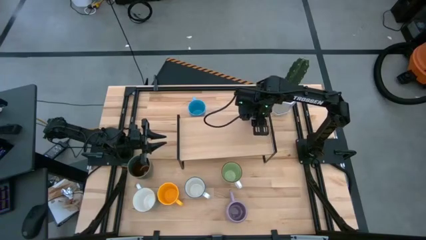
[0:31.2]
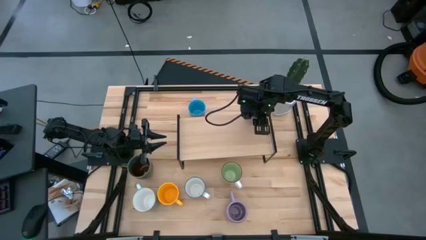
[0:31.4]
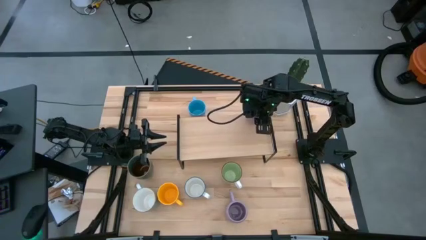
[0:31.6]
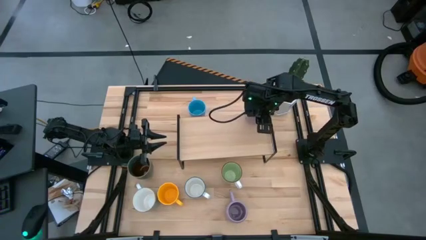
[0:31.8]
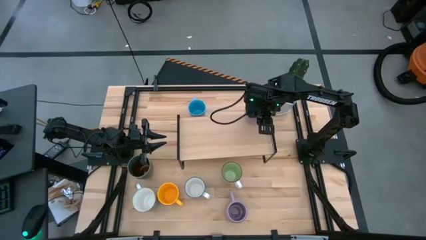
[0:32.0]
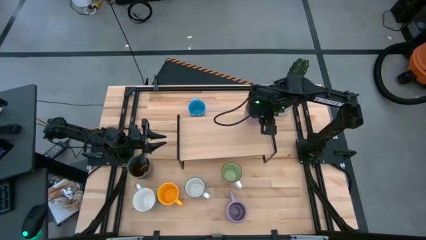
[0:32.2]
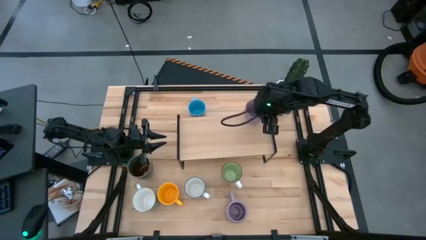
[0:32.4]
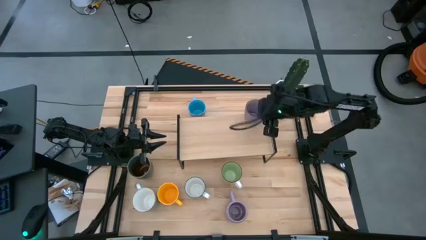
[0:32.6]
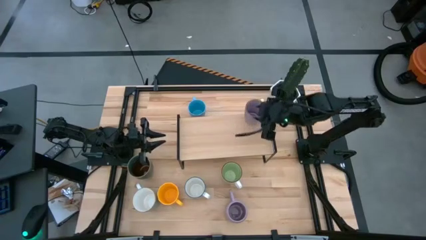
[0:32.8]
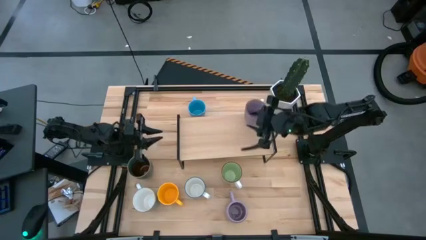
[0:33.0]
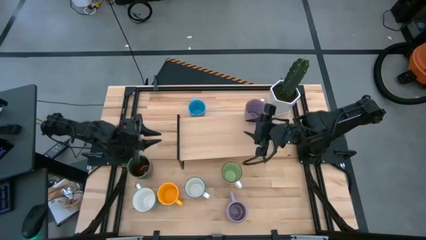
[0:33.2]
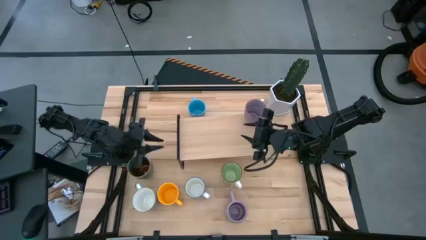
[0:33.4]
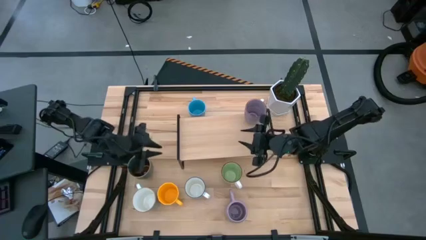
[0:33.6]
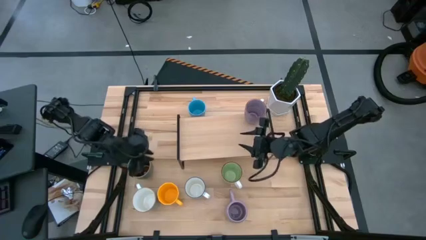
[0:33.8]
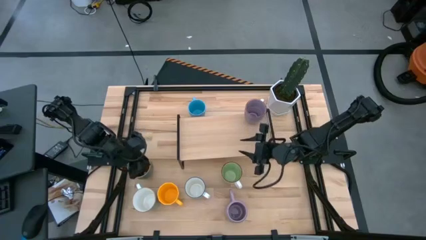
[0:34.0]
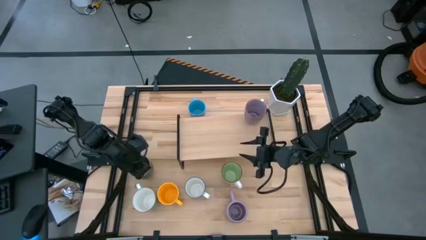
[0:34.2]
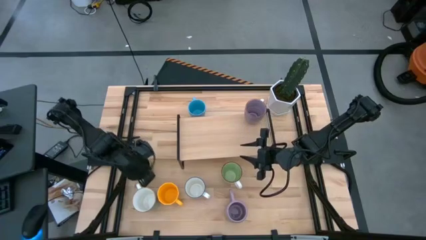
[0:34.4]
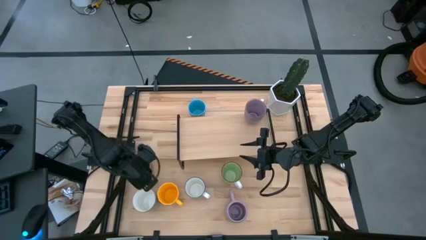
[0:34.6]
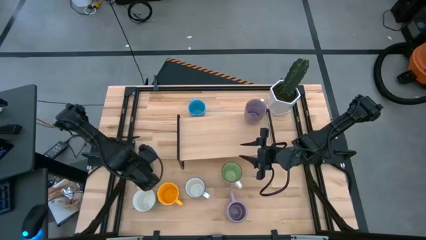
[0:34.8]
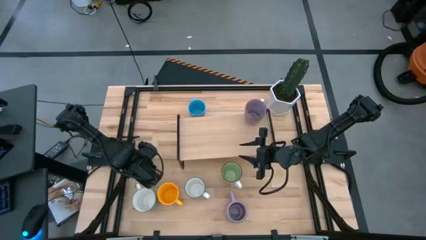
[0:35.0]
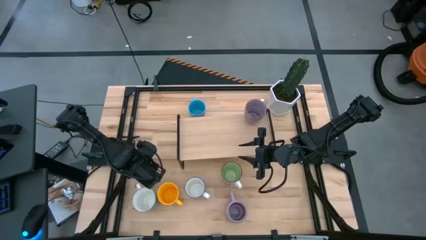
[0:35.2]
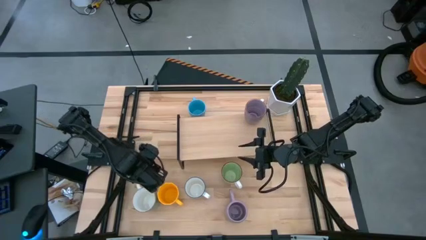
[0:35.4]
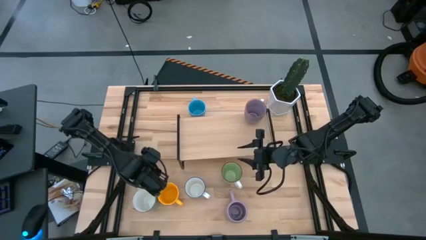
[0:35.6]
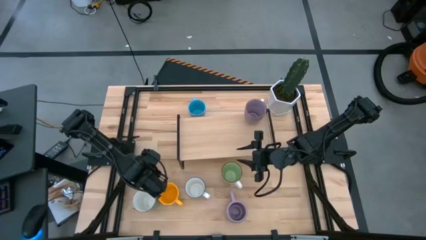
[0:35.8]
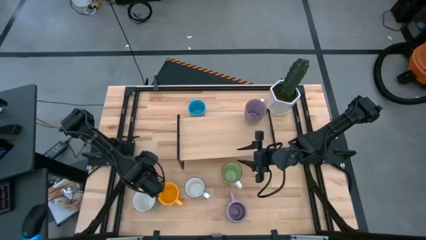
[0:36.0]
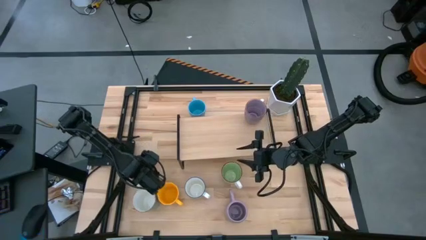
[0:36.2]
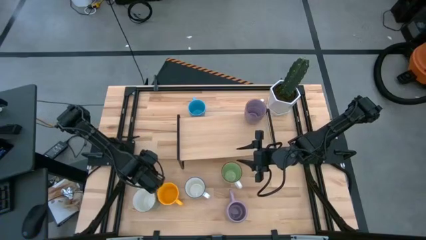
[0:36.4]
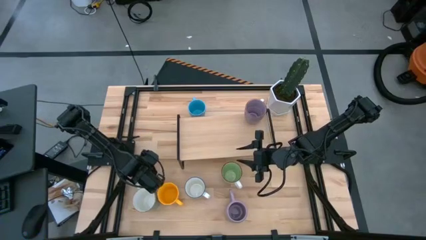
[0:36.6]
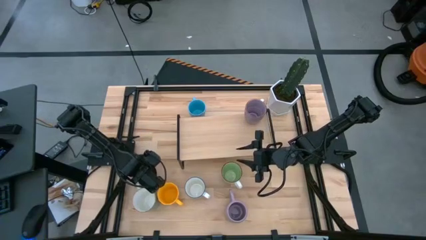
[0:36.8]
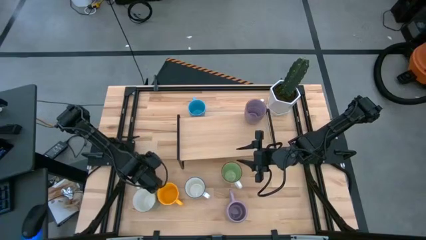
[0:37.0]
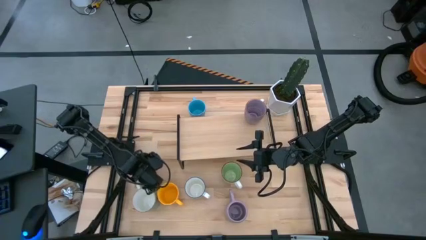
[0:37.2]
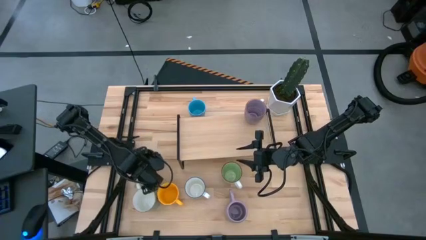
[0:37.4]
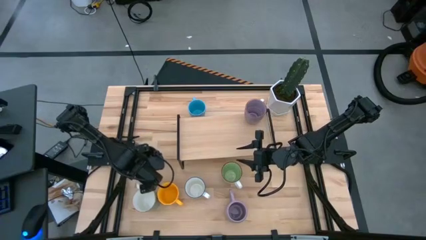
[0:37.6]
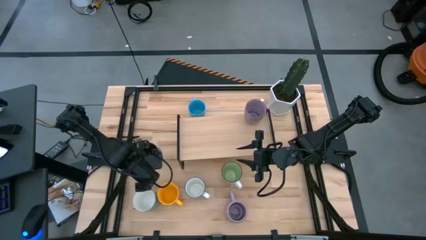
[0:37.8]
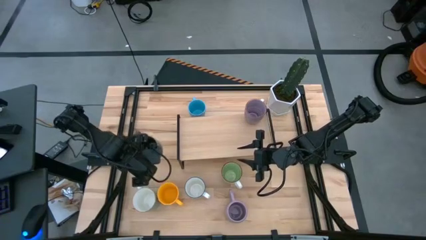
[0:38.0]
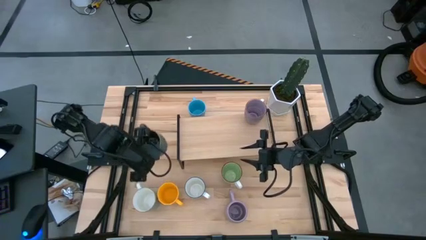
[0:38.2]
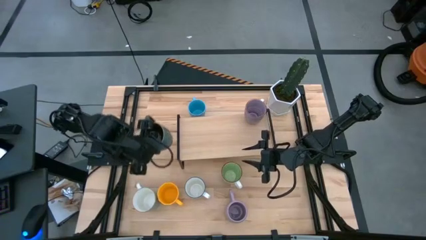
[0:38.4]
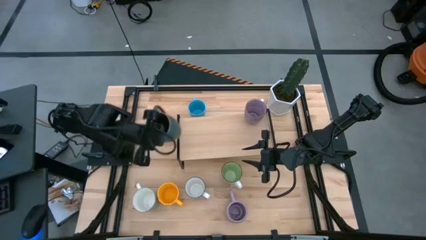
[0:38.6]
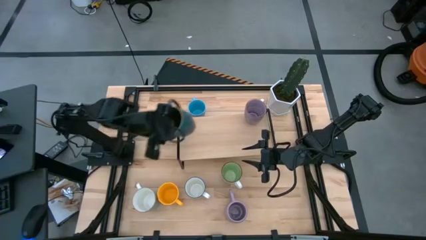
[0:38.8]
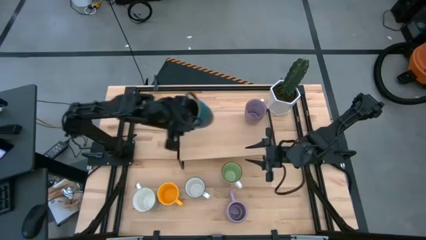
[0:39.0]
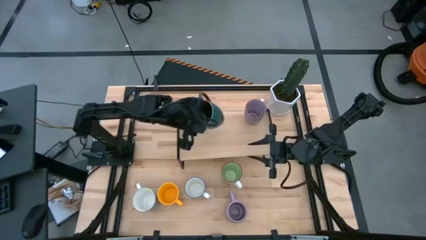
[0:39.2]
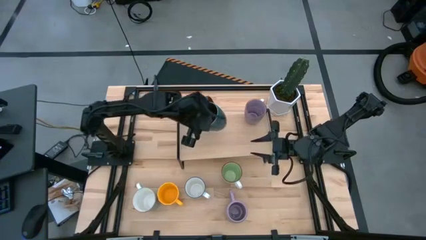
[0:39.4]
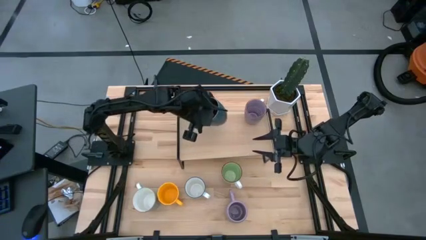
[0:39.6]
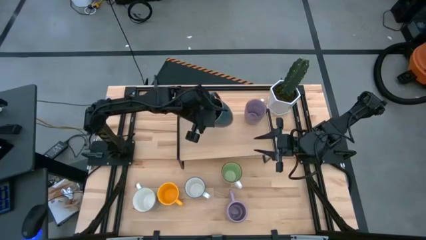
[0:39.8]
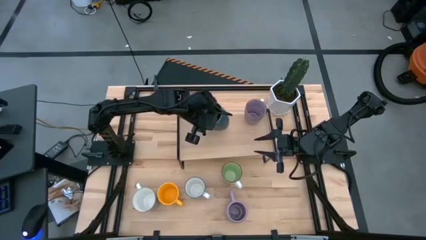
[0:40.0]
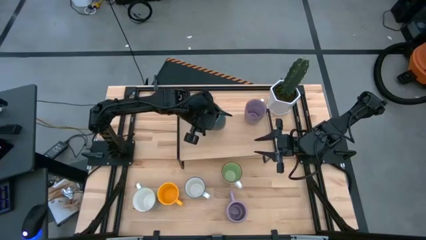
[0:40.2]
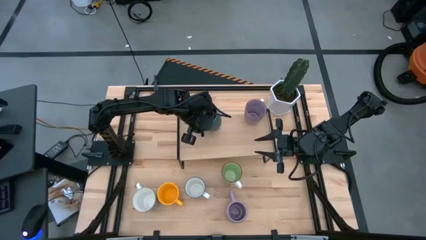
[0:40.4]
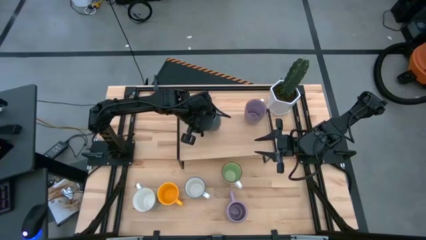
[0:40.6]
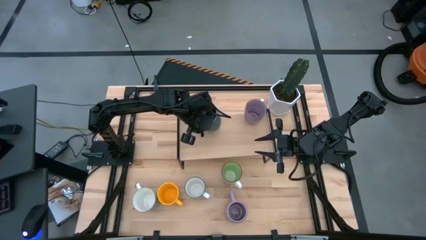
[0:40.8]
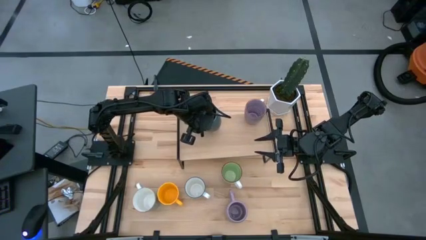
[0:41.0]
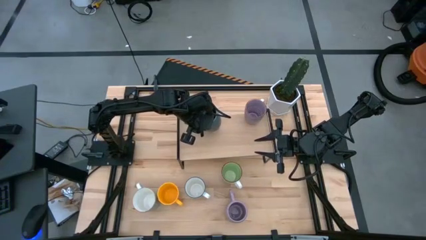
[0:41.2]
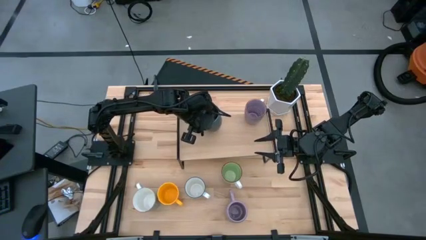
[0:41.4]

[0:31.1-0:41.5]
Task: Place coffee mugs
Put the green-brown mug on the shelf
